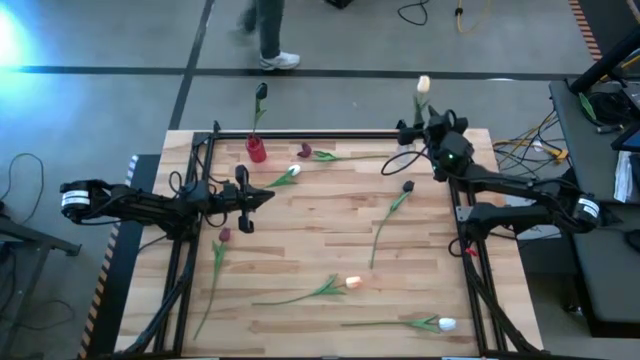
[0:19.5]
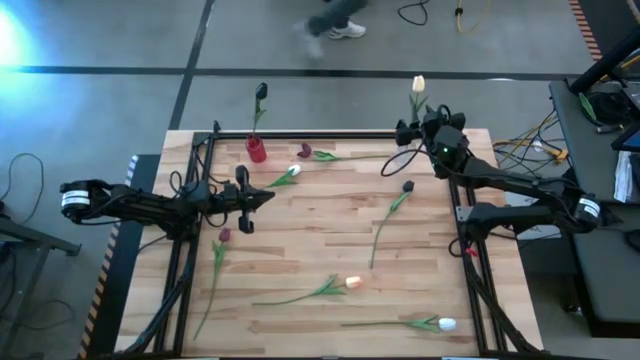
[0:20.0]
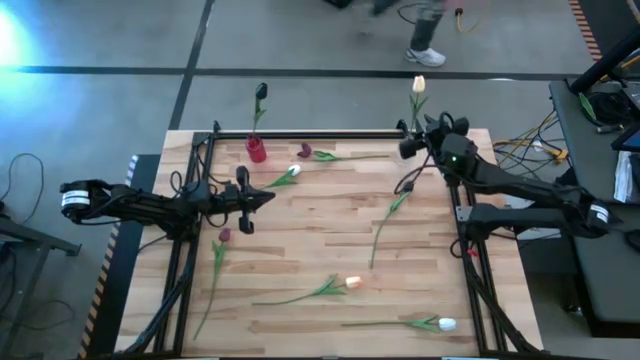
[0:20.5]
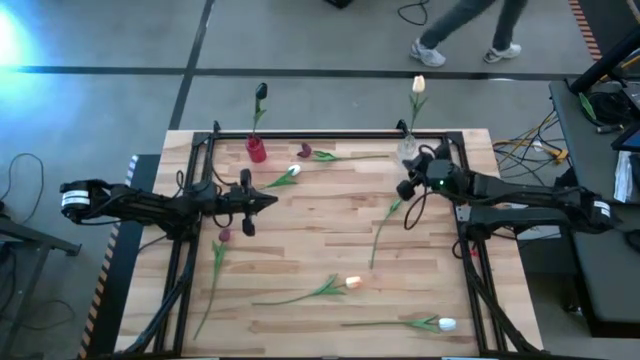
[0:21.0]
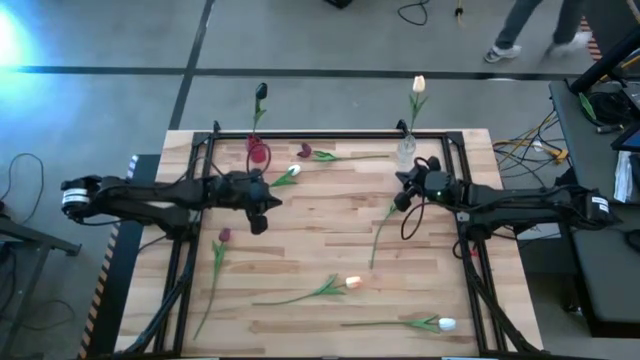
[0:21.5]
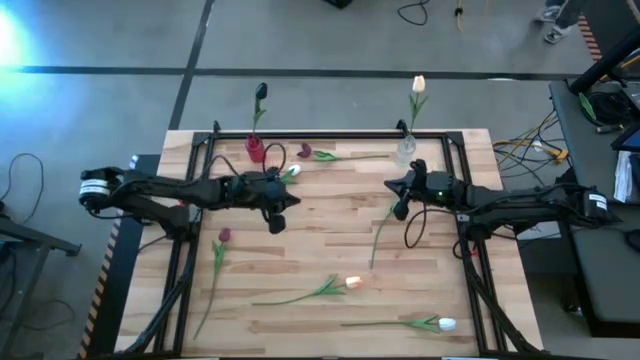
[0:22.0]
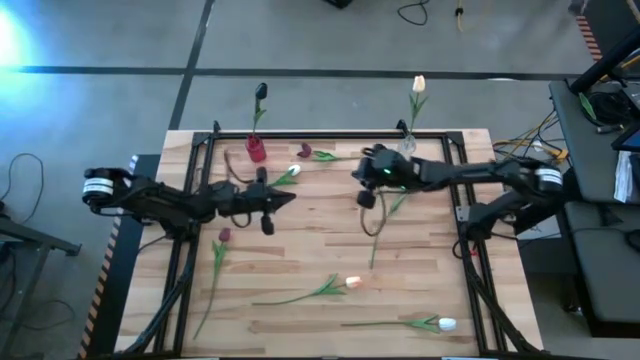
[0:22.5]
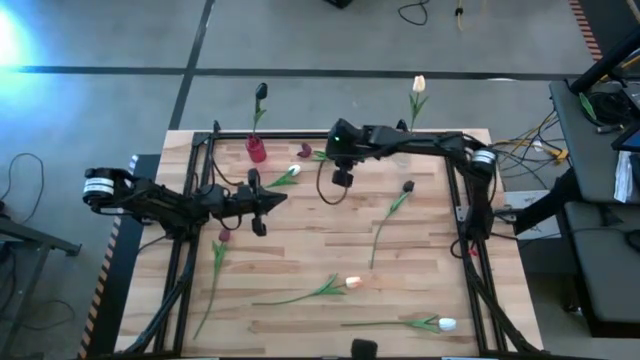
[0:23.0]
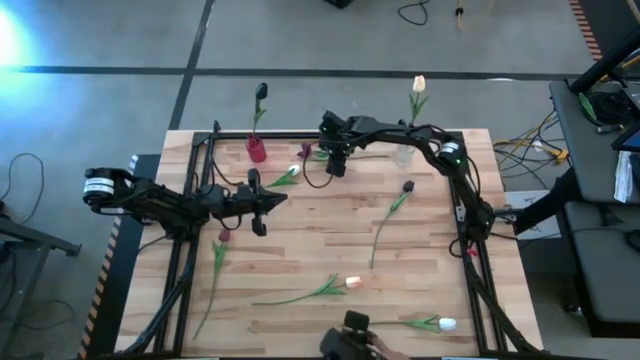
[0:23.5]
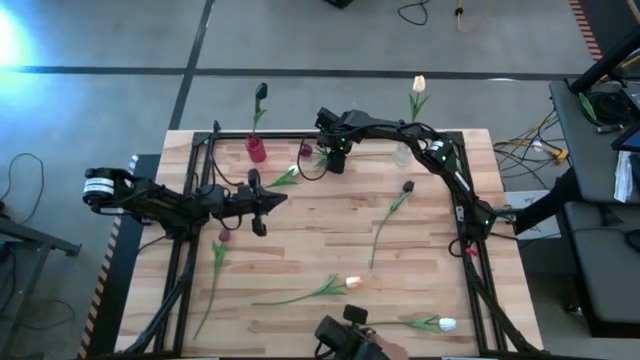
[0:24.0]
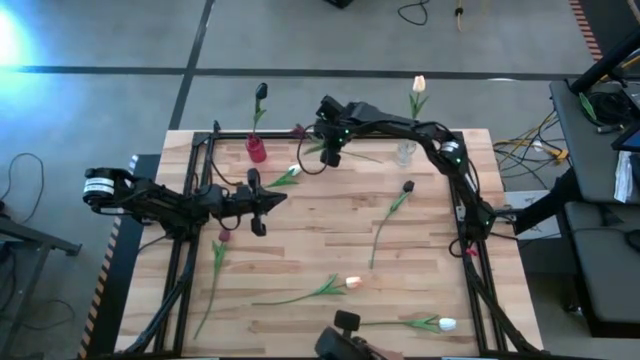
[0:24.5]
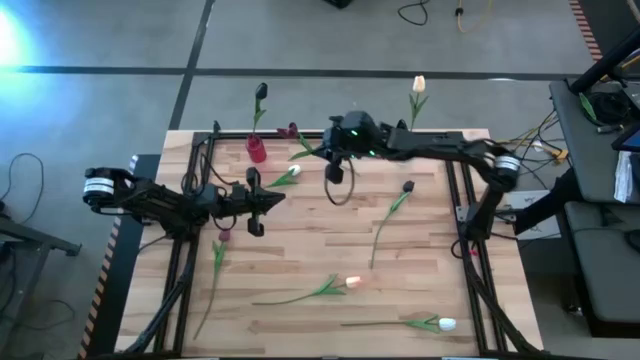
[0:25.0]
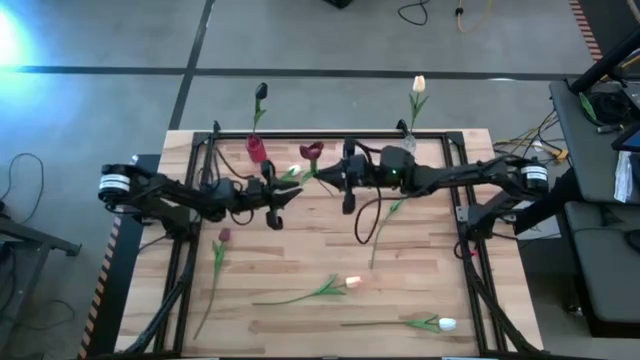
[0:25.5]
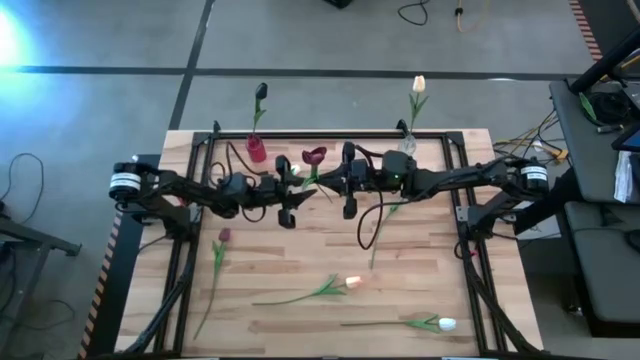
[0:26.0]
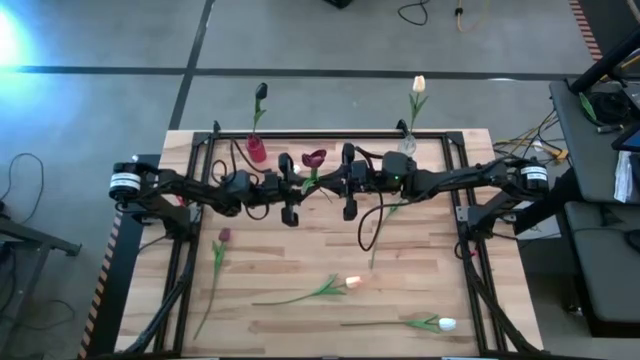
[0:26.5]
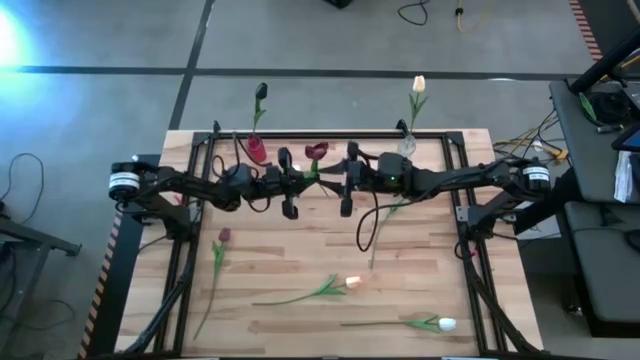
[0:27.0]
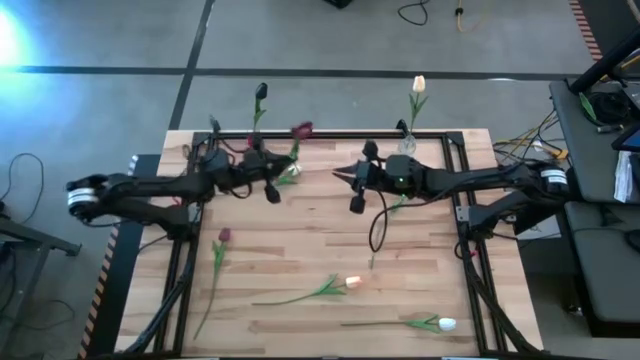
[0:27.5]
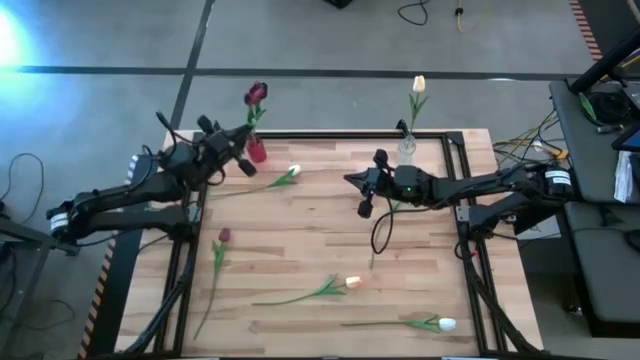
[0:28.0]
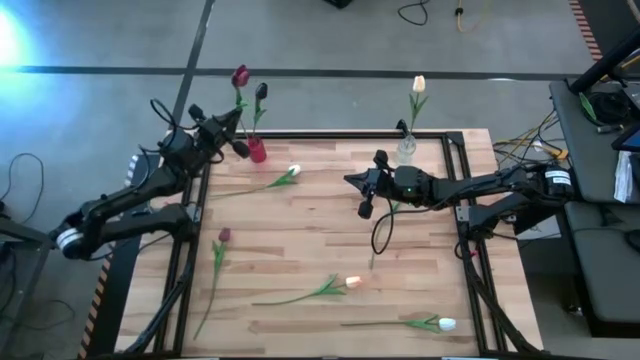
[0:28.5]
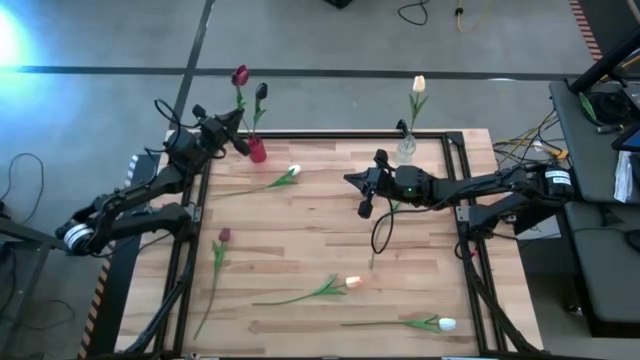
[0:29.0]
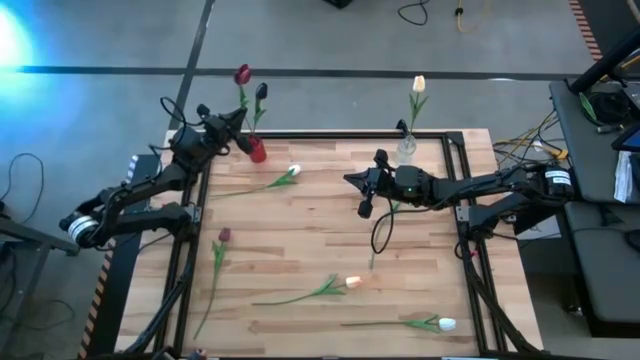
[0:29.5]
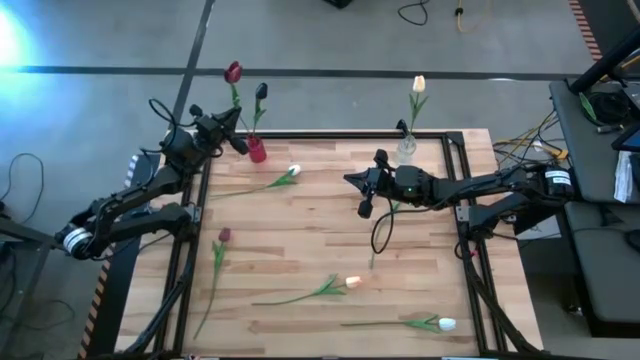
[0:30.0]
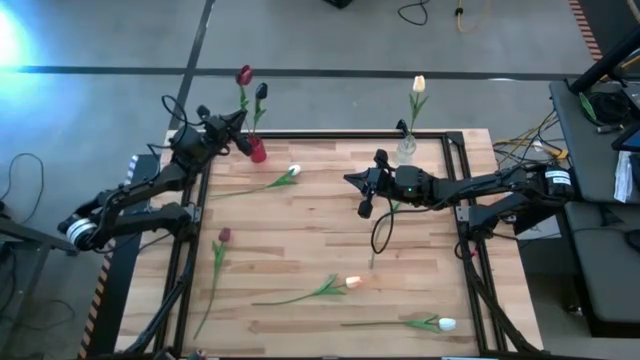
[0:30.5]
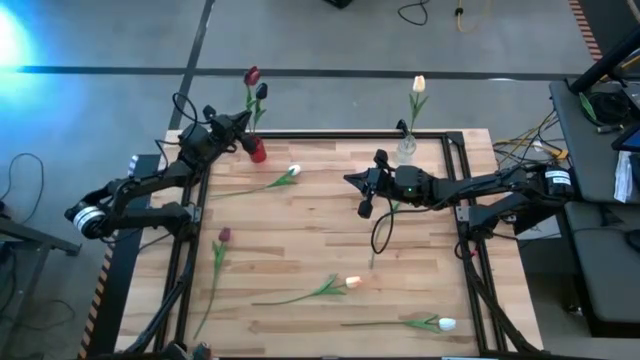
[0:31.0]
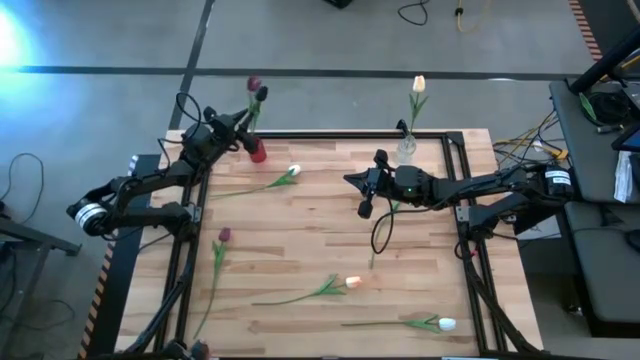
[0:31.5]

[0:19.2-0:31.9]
Task: Sort flowers into vase by color
Put the top red flower into the red vase

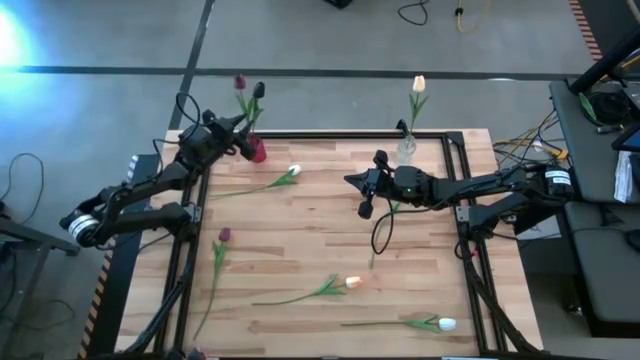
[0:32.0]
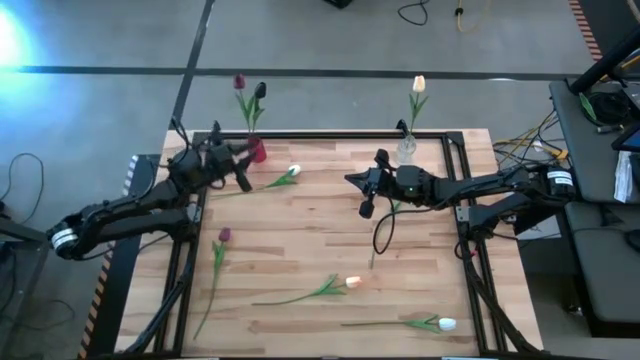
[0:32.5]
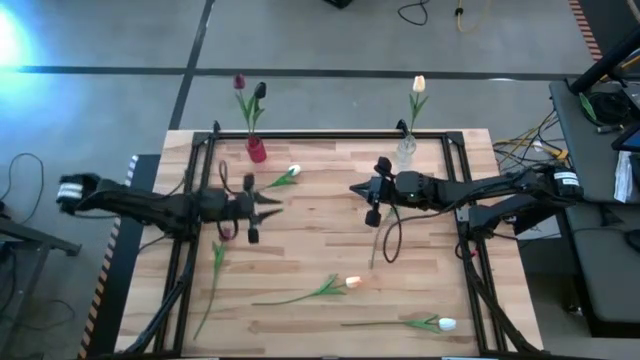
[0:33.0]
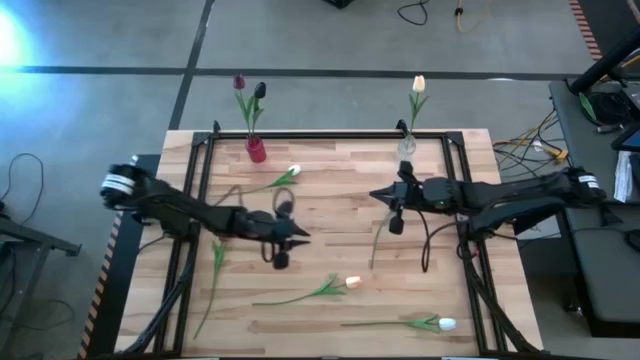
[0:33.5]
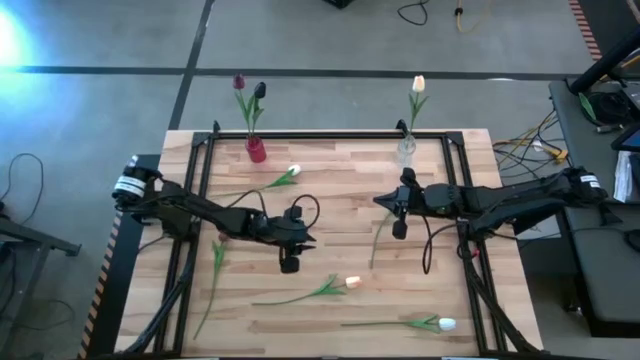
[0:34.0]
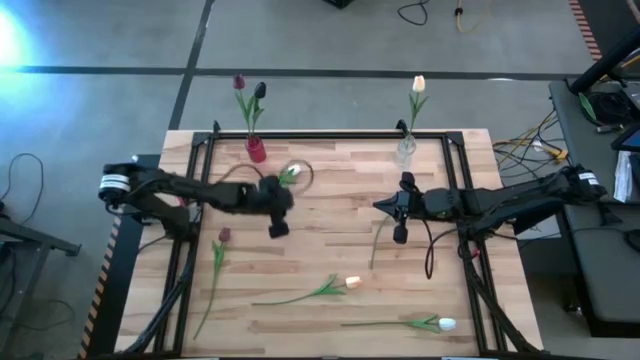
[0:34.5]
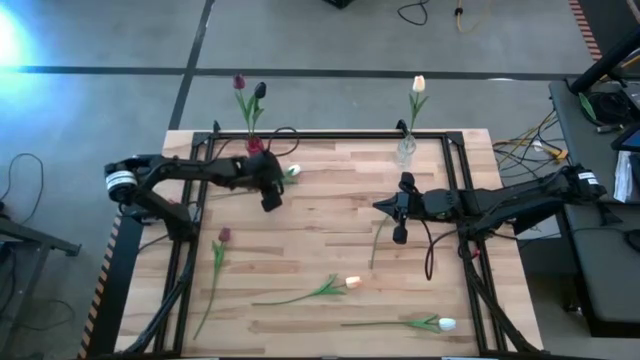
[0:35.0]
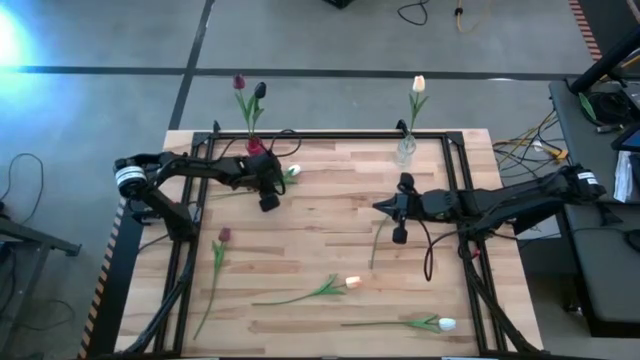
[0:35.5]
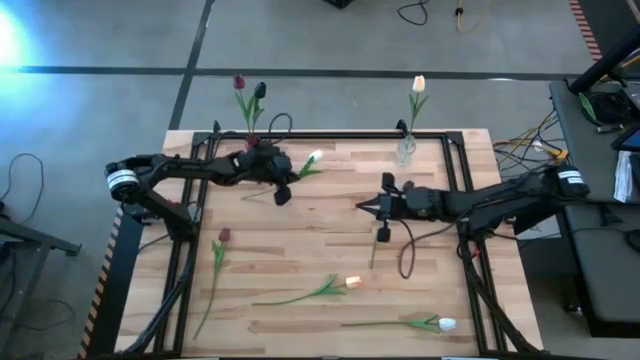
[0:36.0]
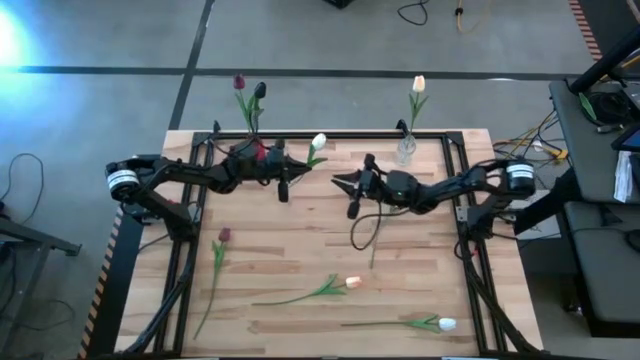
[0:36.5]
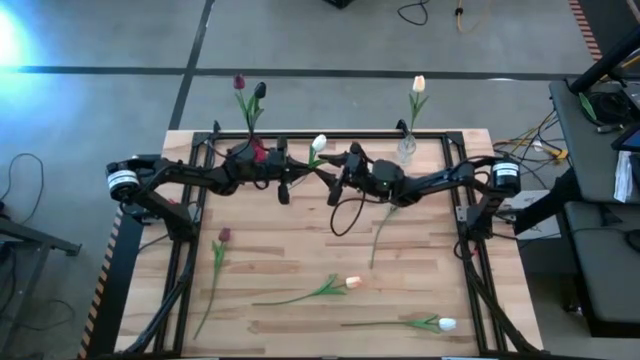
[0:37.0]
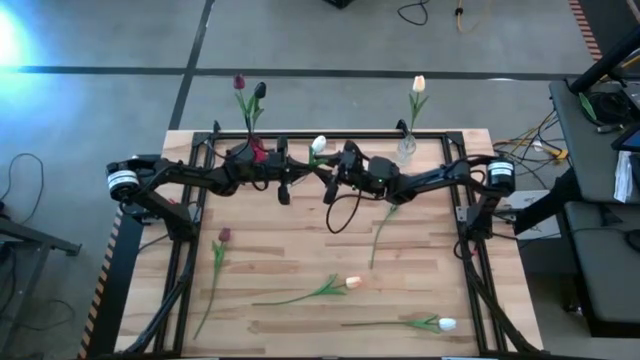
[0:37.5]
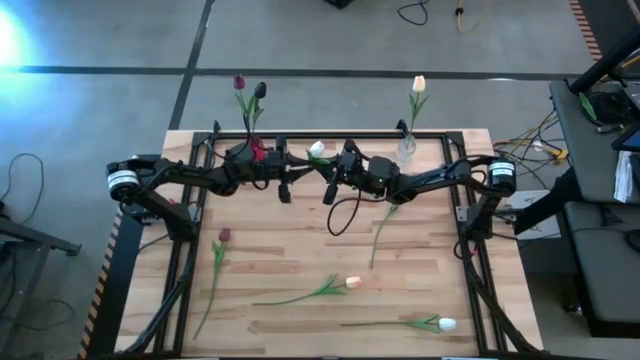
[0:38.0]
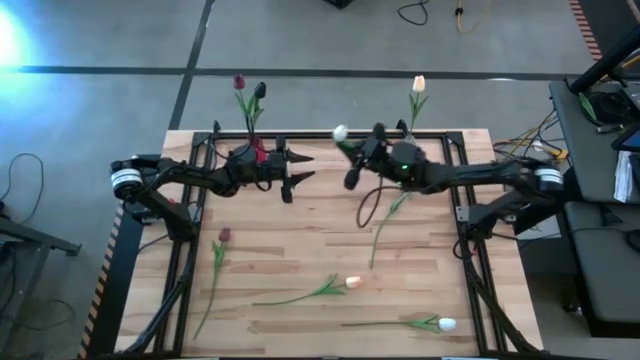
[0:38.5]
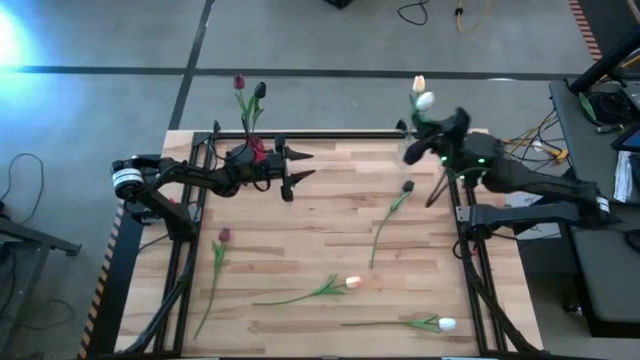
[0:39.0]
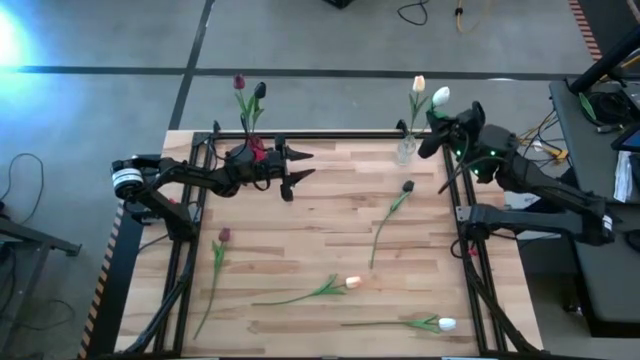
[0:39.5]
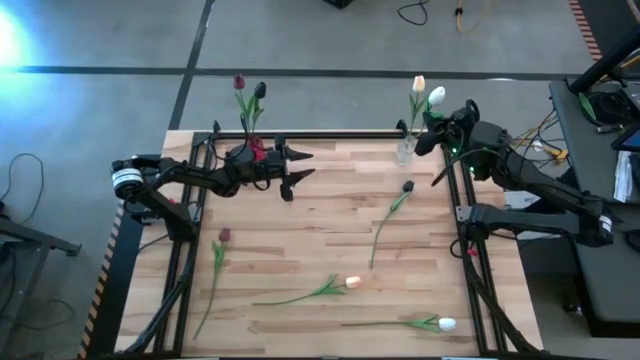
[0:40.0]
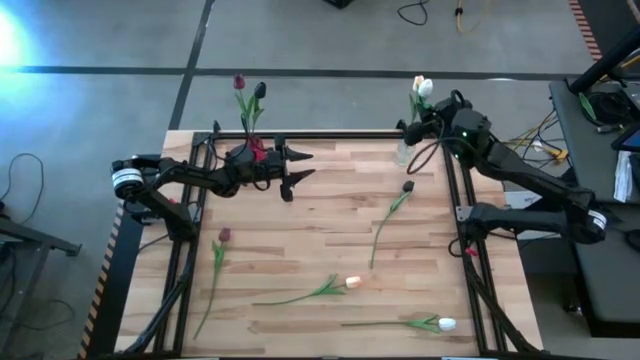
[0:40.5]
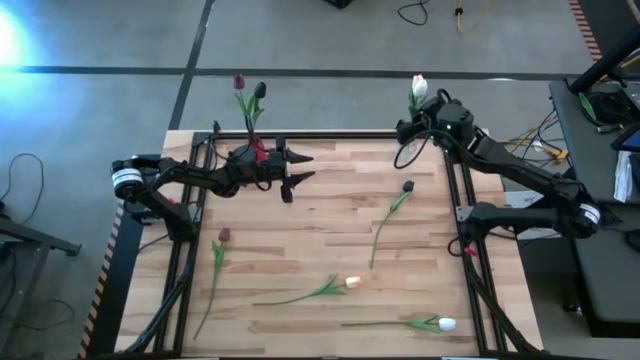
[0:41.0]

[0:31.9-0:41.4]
Put the top white flower into the transparent vase
